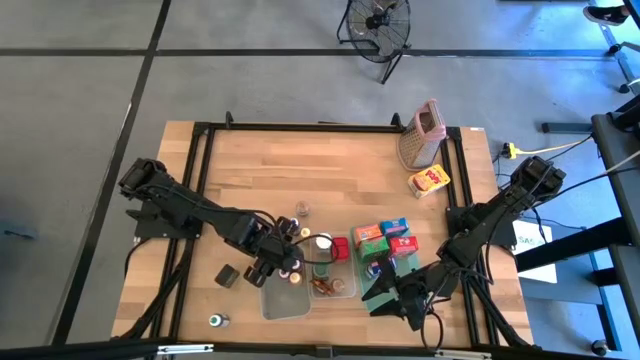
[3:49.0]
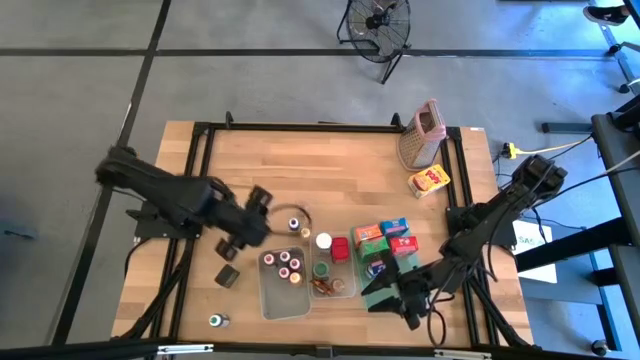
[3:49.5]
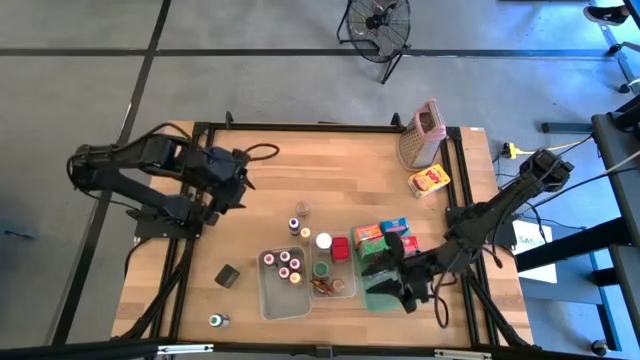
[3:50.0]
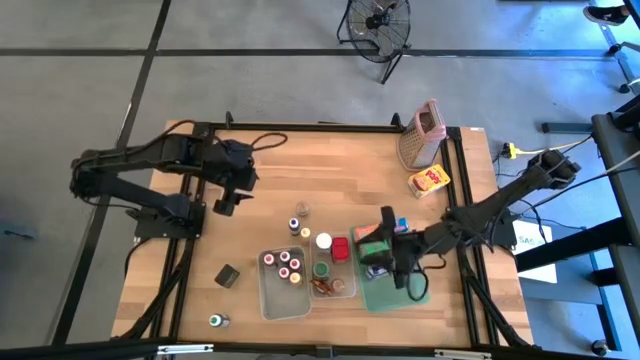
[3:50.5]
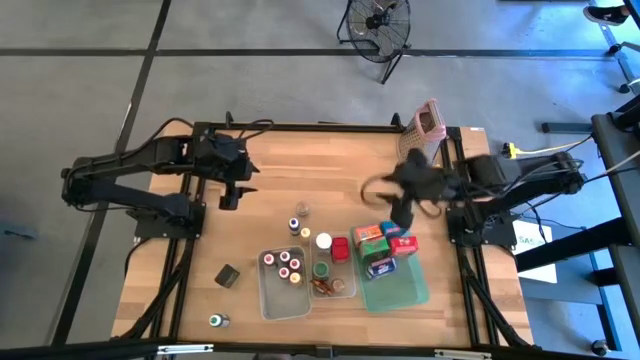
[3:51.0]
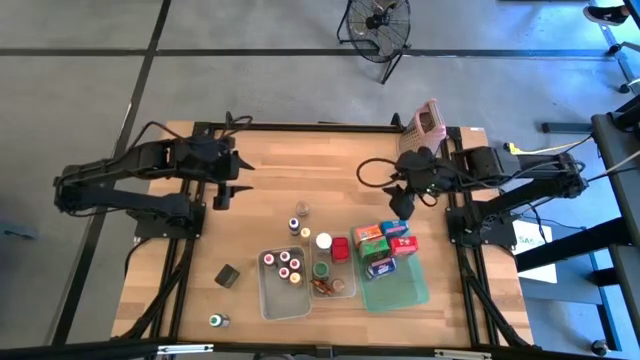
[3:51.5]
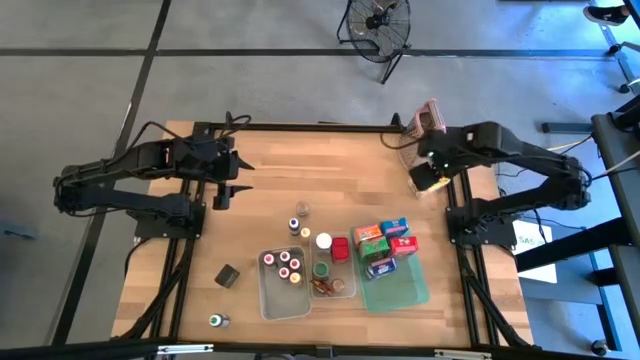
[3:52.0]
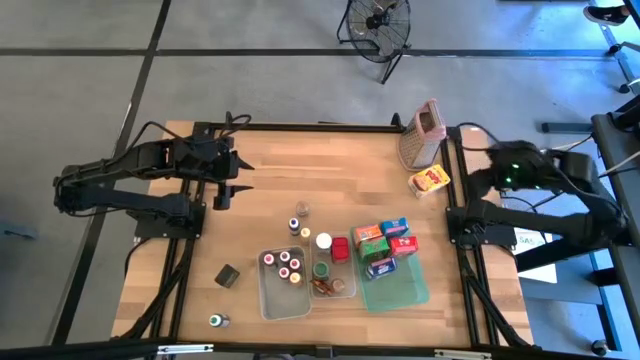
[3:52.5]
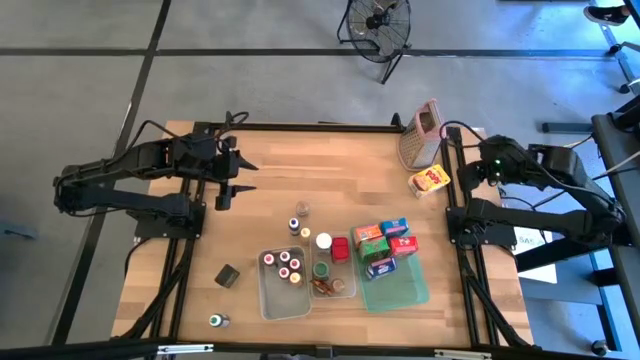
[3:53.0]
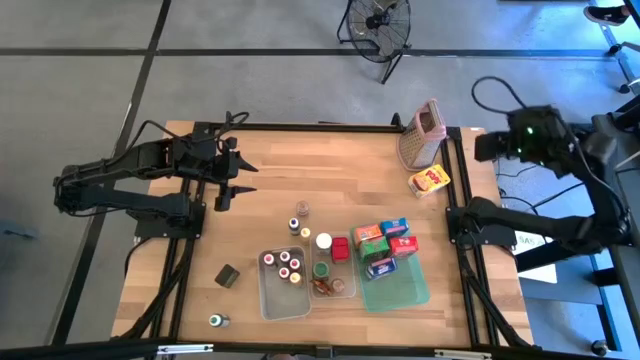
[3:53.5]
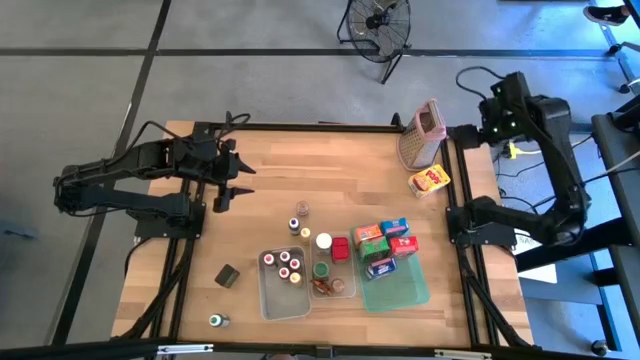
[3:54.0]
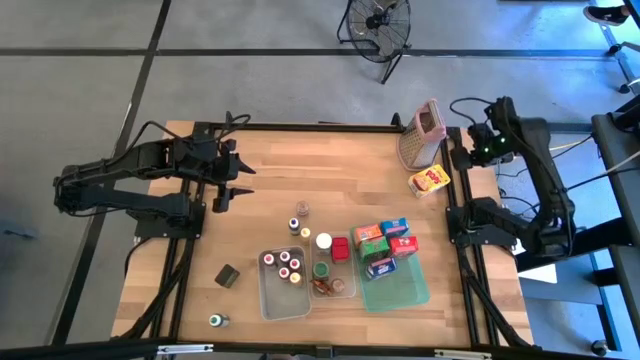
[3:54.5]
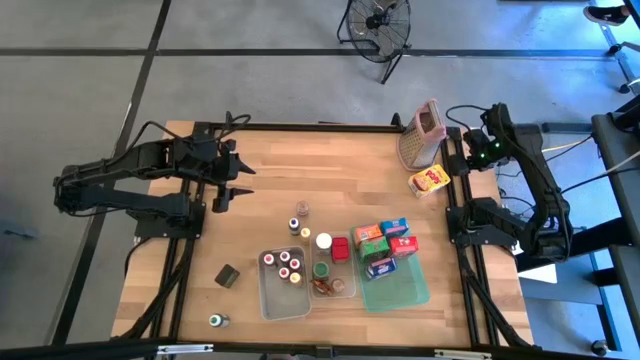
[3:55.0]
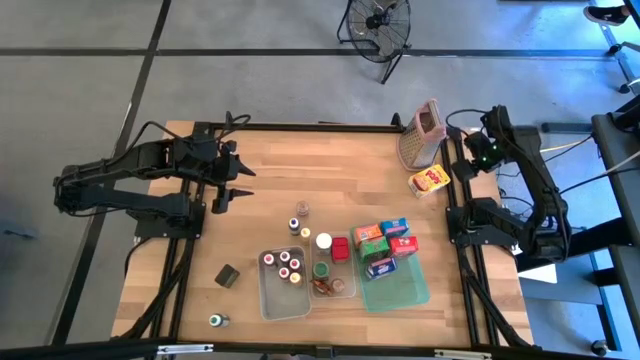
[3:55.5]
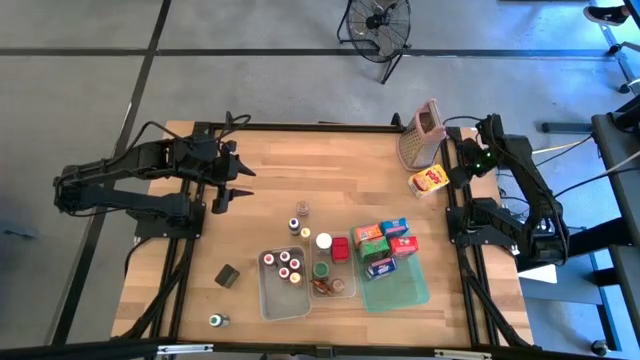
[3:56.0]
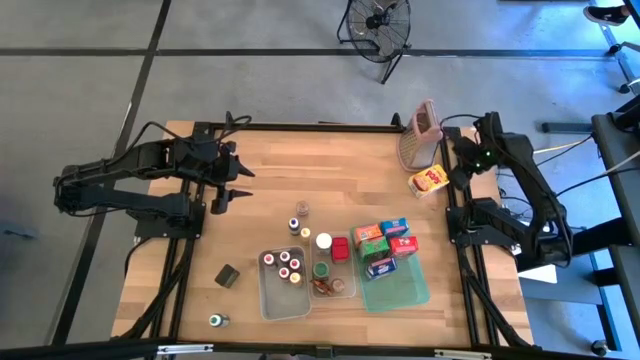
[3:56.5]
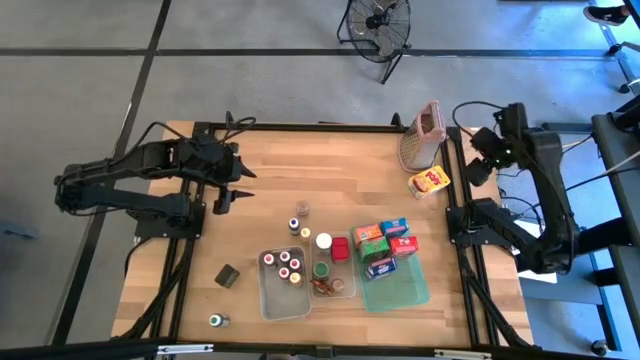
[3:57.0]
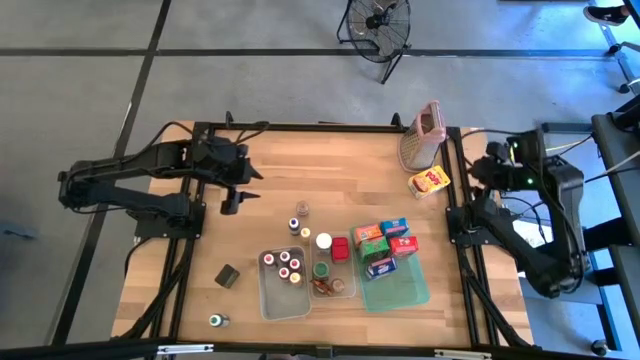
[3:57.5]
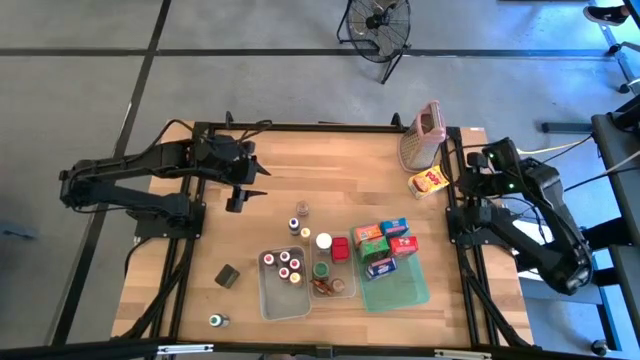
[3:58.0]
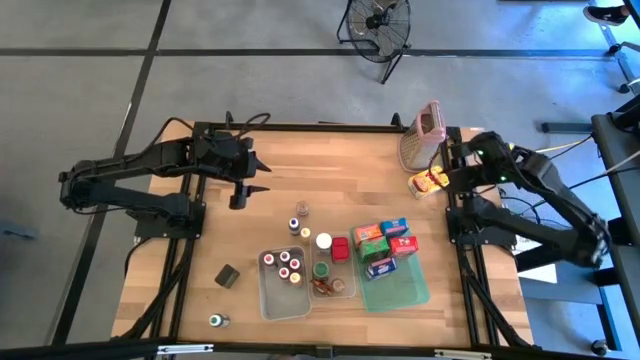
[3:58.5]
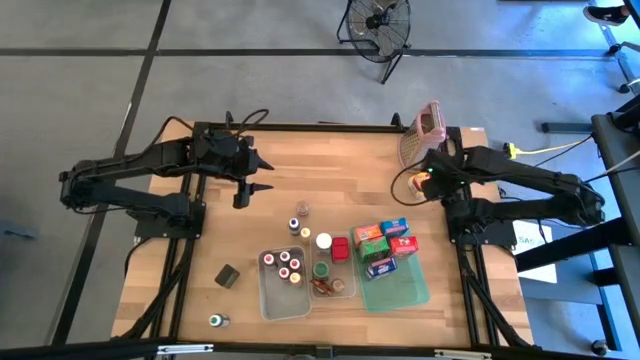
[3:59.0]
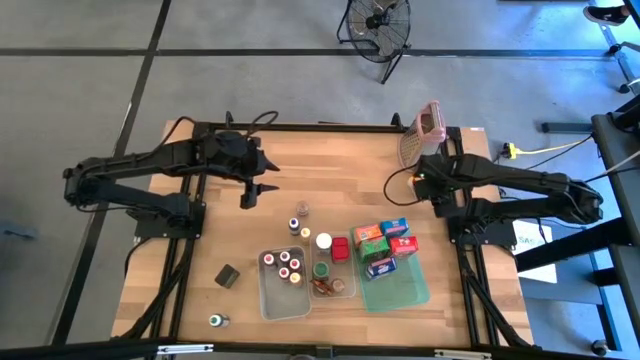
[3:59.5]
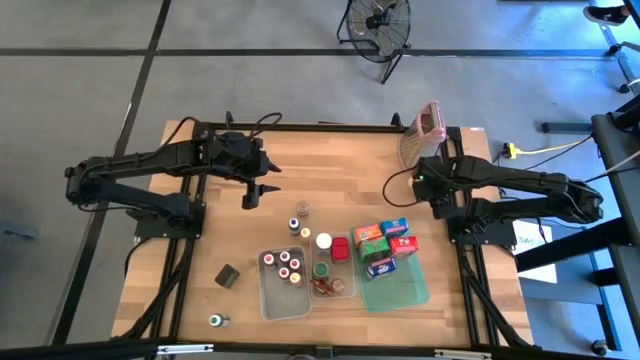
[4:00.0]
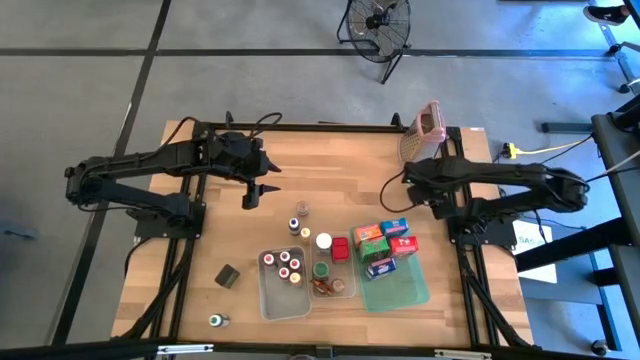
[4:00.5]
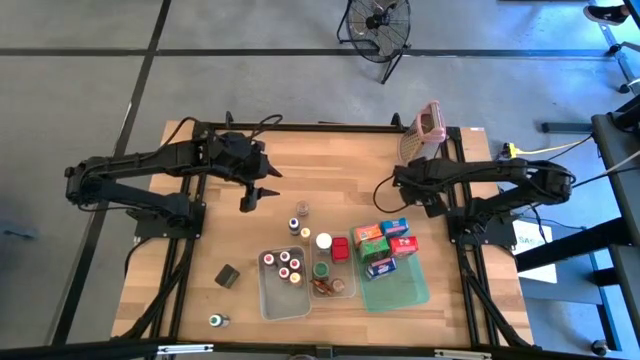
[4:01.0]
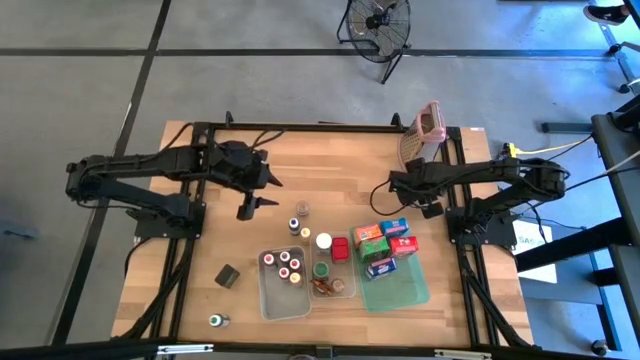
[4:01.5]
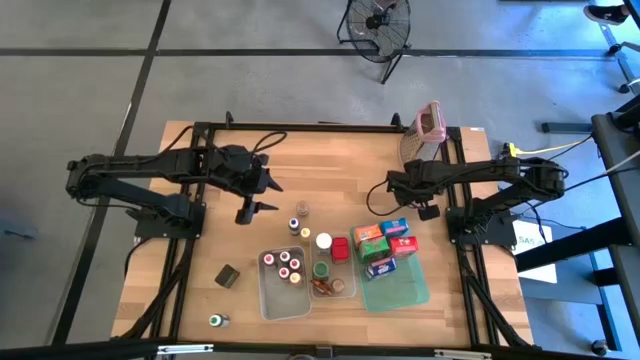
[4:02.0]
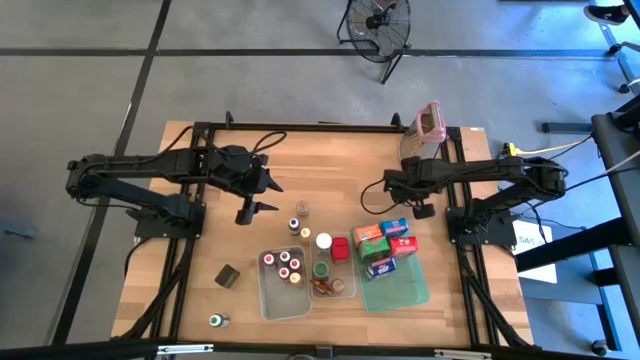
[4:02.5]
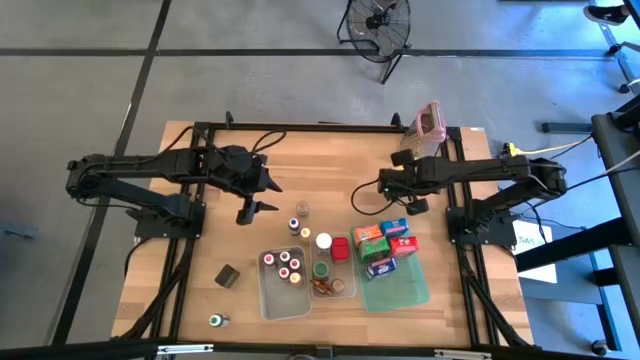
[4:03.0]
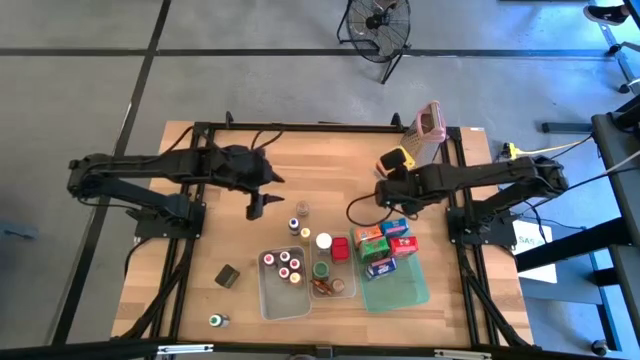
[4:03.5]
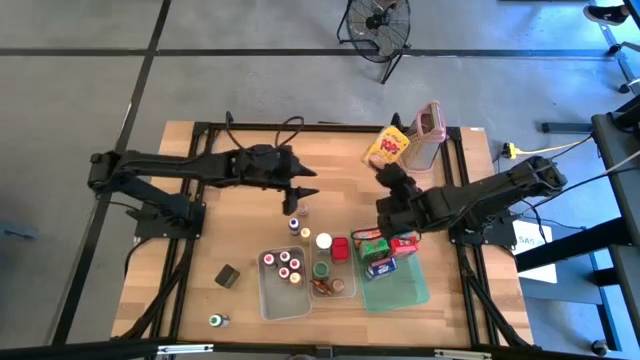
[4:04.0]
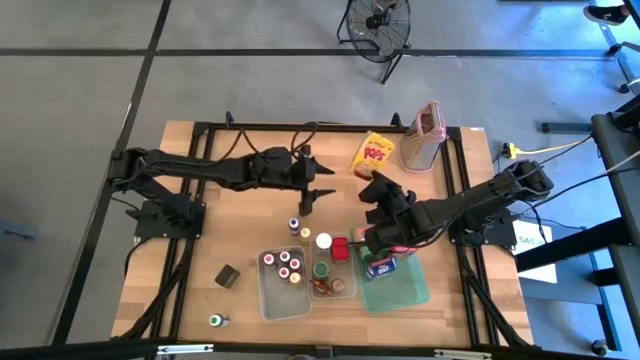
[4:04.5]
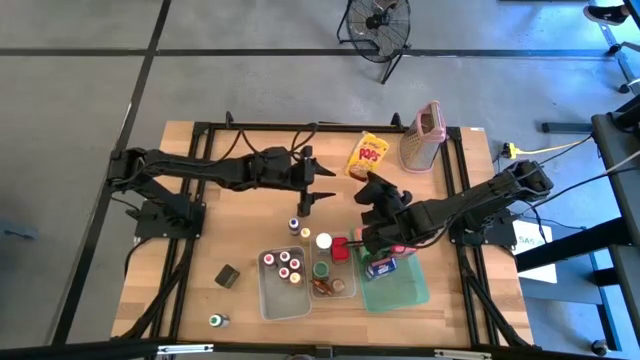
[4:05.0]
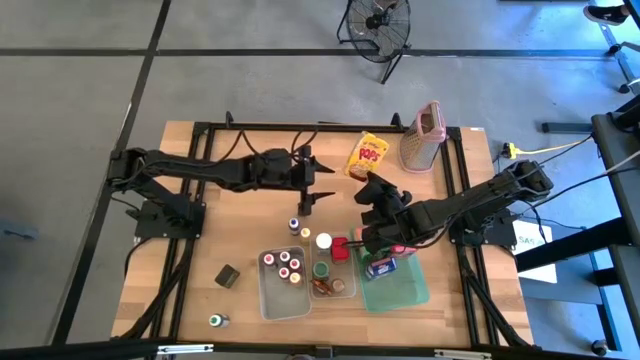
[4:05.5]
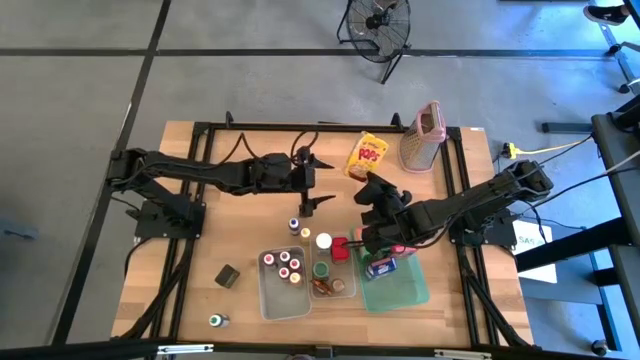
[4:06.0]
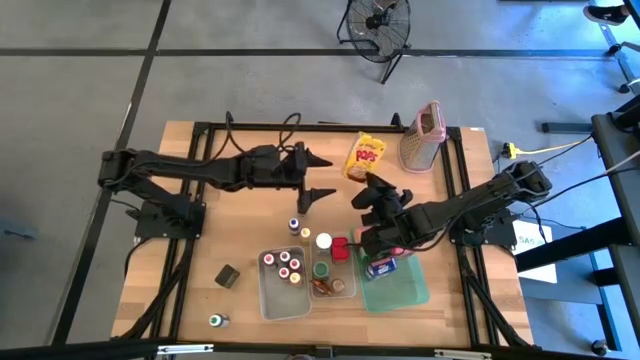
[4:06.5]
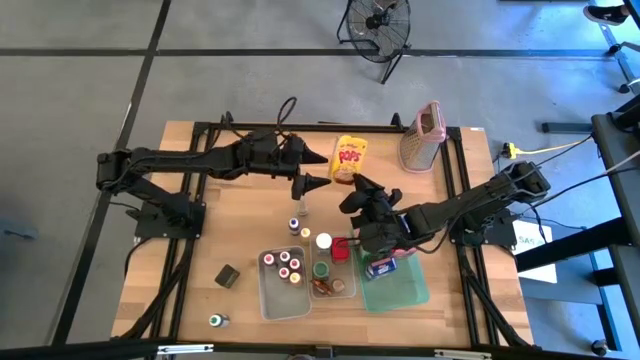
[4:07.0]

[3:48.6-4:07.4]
Task: Pick & Place Kitchen Items
Put the yellow cereal box into the blue bin

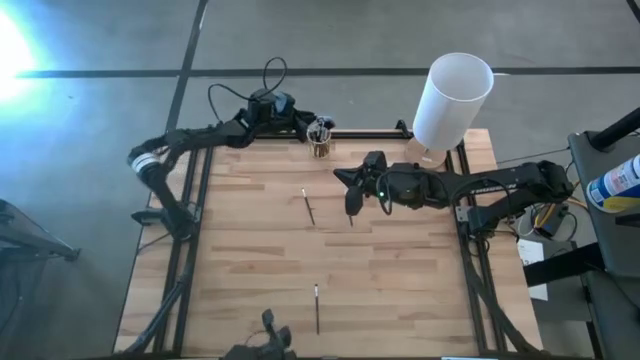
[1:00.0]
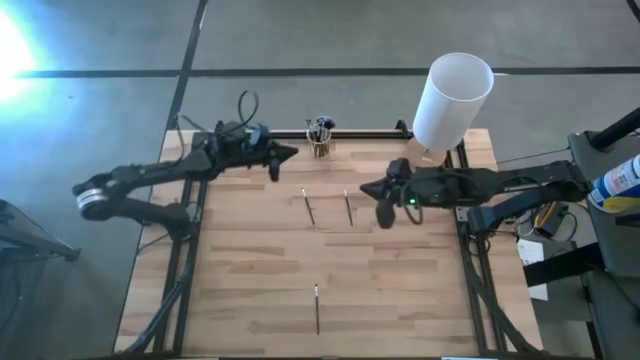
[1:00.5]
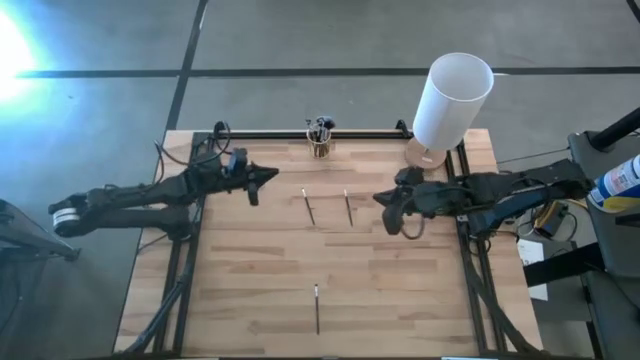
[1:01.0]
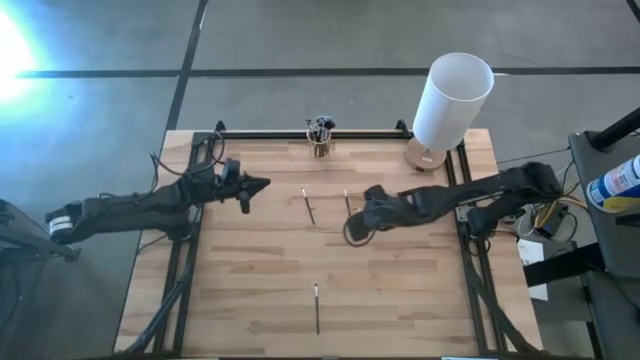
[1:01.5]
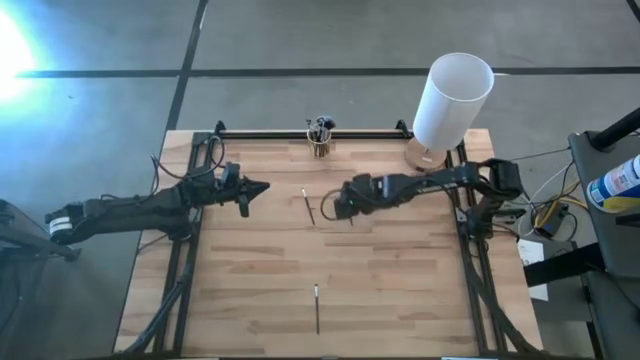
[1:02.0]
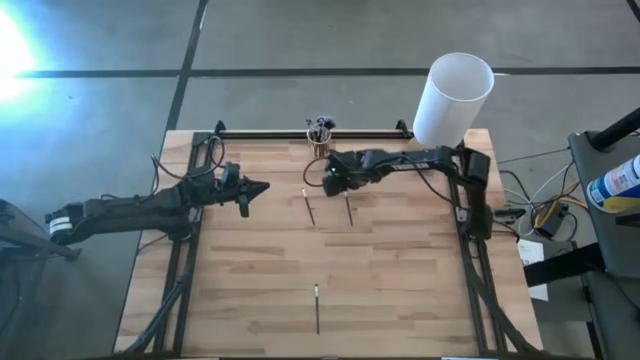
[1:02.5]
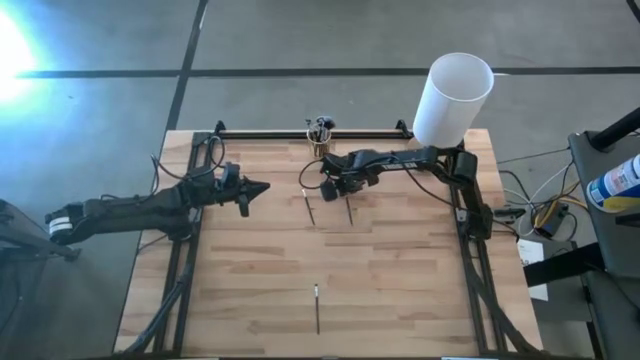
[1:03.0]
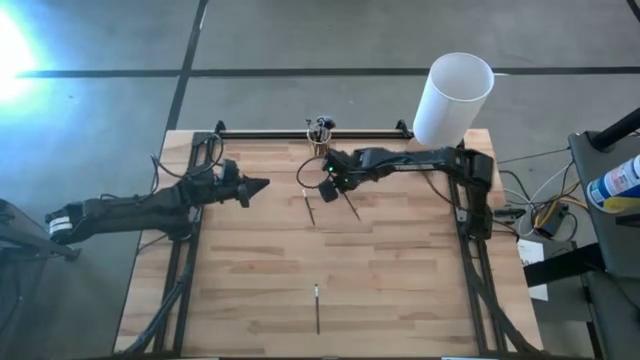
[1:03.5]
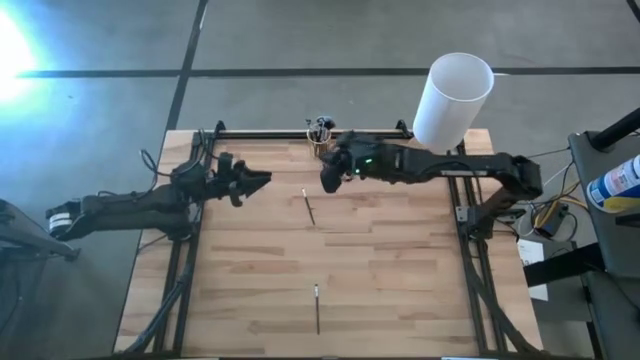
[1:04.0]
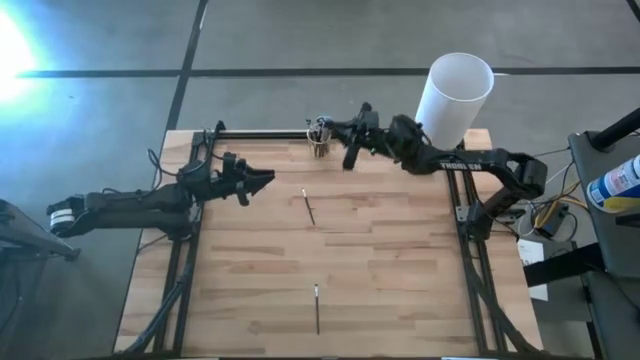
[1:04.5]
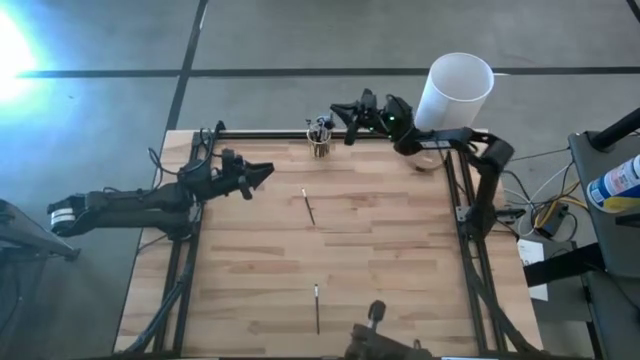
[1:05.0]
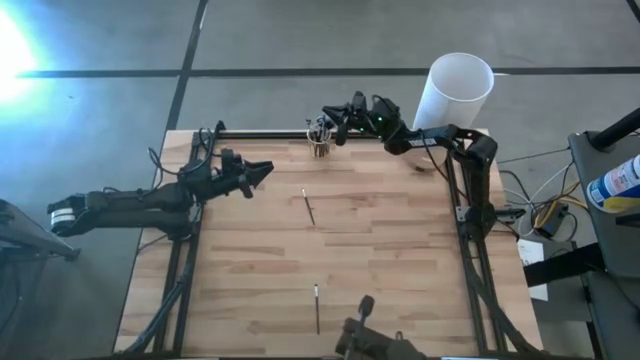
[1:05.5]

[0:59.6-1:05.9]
Task: Put items in baskets/containers
Put the black liner brush into the yellow pen holder
